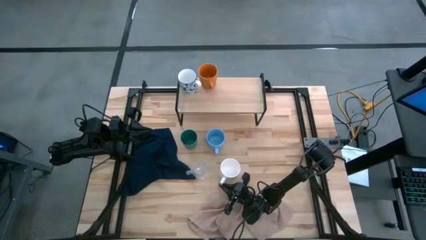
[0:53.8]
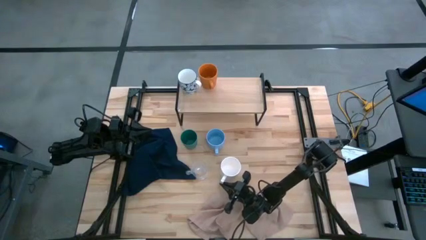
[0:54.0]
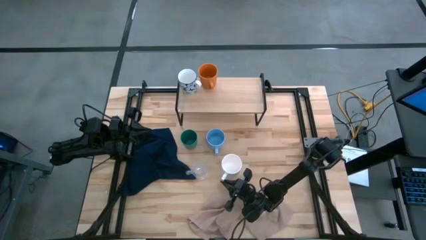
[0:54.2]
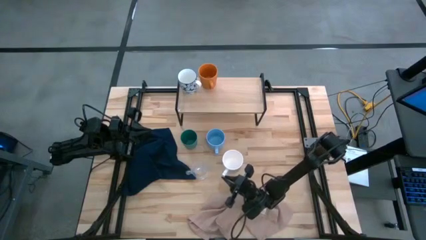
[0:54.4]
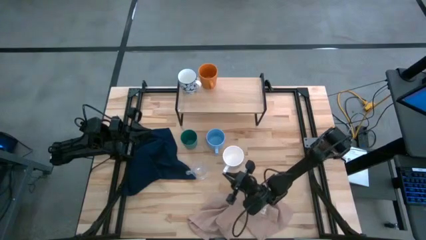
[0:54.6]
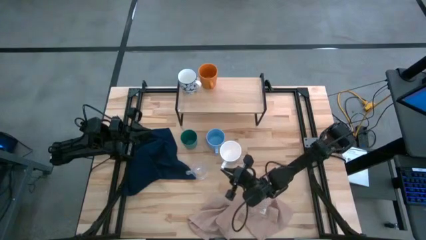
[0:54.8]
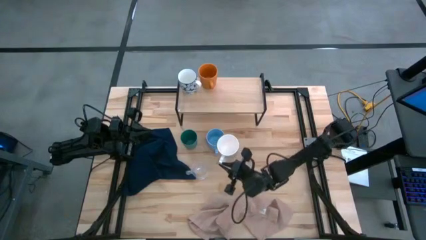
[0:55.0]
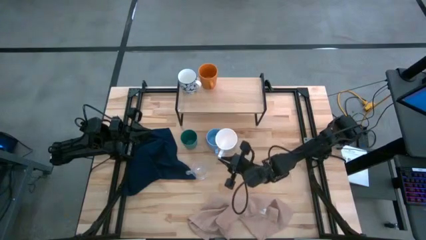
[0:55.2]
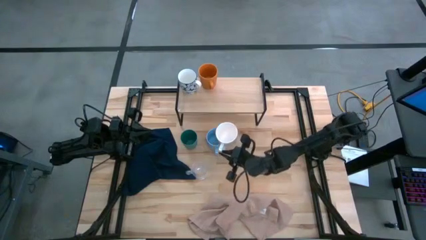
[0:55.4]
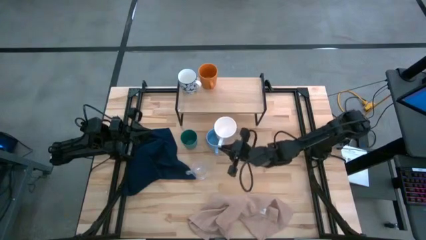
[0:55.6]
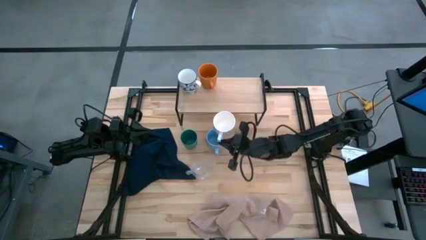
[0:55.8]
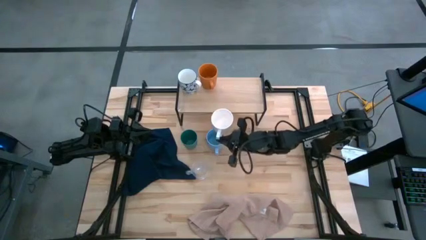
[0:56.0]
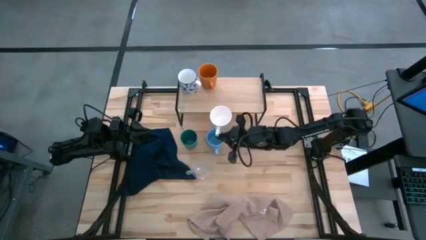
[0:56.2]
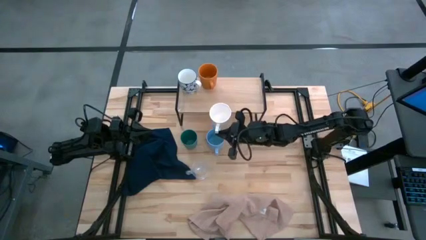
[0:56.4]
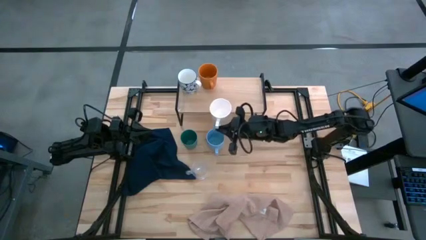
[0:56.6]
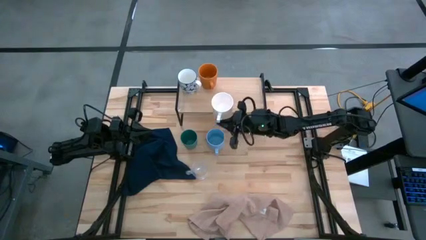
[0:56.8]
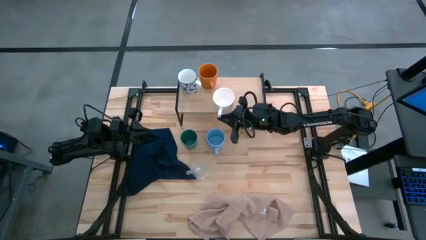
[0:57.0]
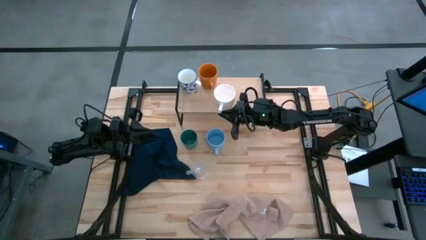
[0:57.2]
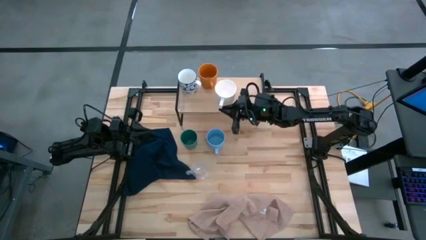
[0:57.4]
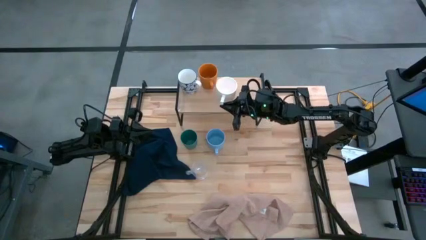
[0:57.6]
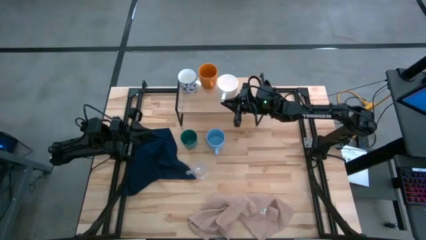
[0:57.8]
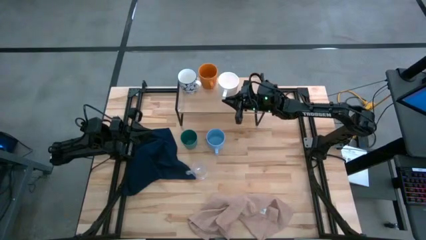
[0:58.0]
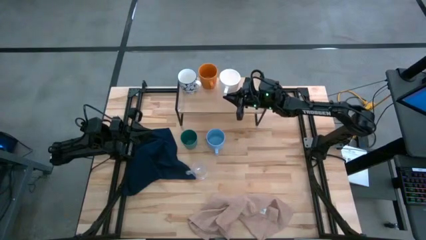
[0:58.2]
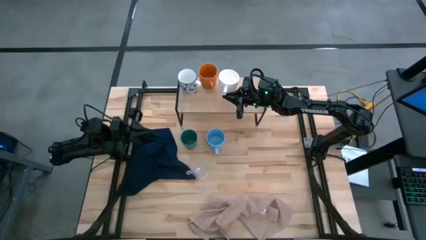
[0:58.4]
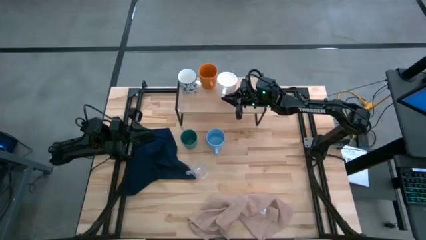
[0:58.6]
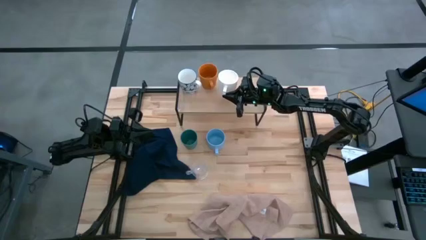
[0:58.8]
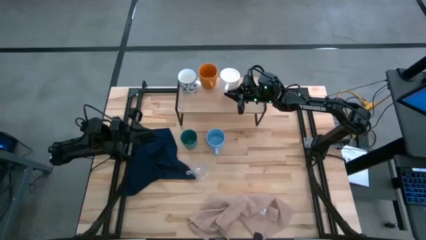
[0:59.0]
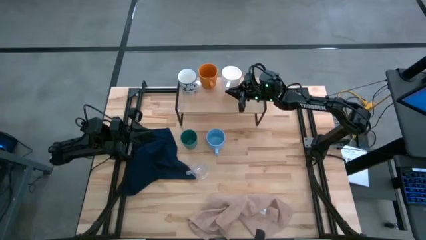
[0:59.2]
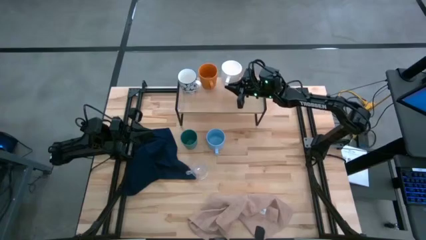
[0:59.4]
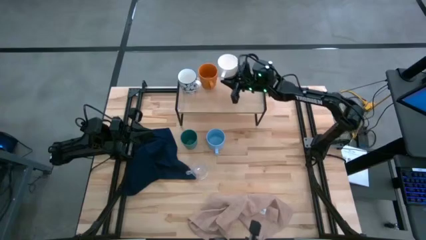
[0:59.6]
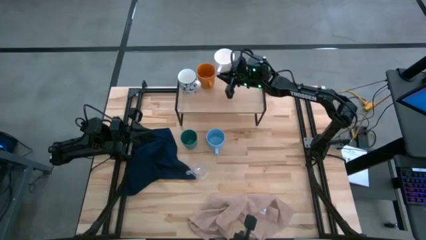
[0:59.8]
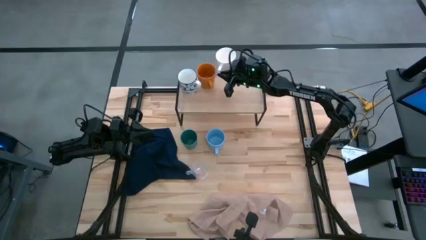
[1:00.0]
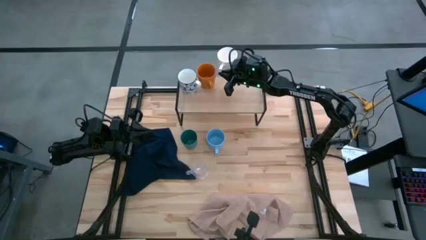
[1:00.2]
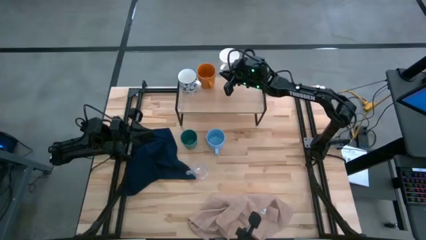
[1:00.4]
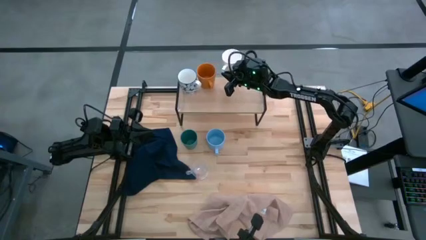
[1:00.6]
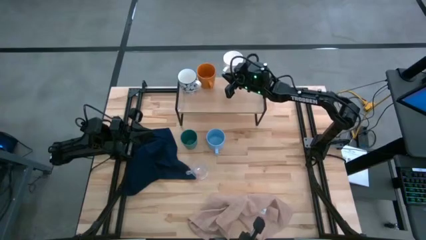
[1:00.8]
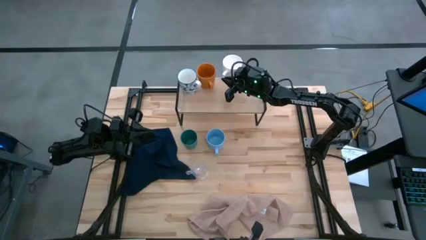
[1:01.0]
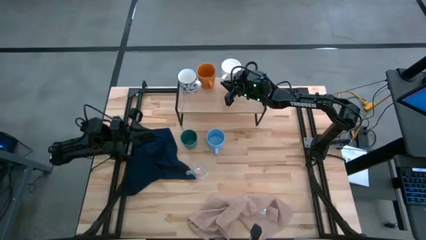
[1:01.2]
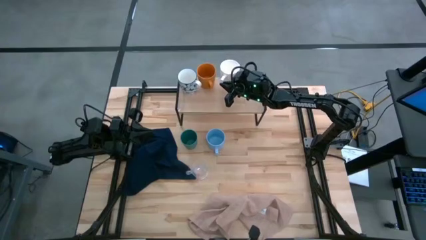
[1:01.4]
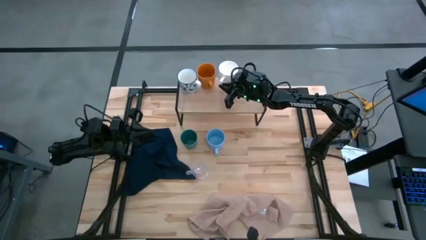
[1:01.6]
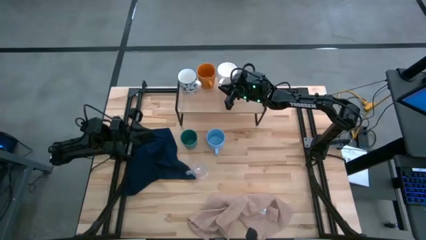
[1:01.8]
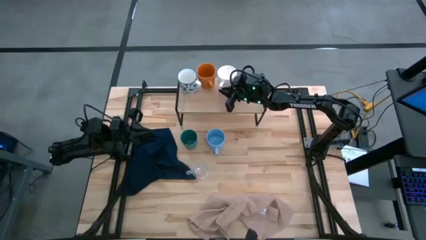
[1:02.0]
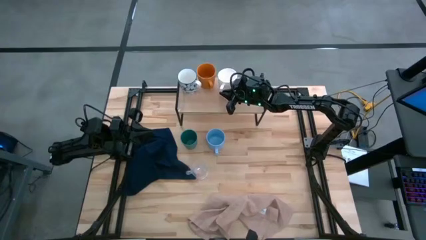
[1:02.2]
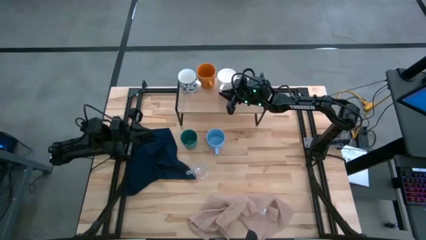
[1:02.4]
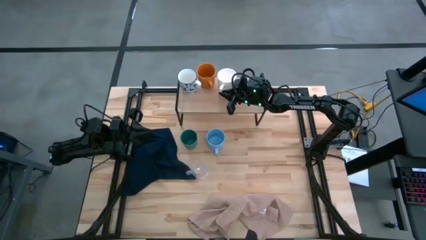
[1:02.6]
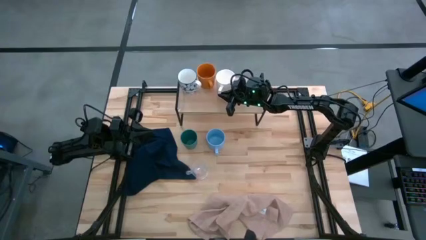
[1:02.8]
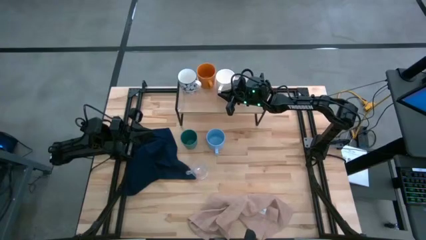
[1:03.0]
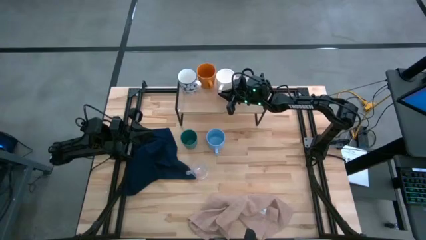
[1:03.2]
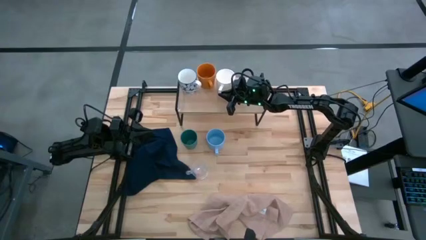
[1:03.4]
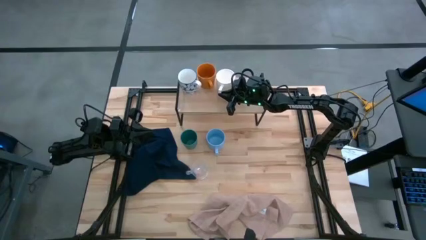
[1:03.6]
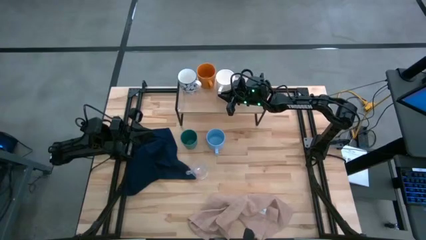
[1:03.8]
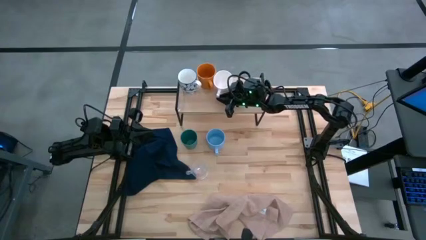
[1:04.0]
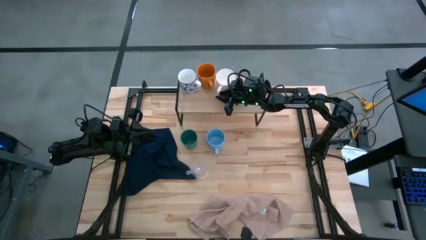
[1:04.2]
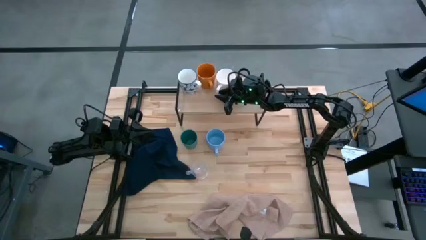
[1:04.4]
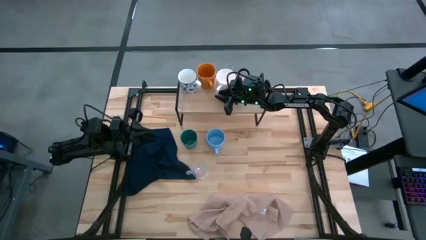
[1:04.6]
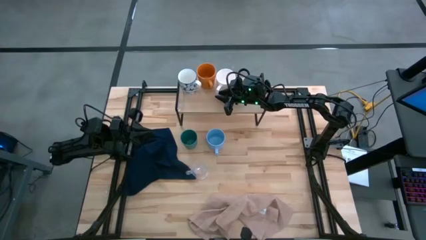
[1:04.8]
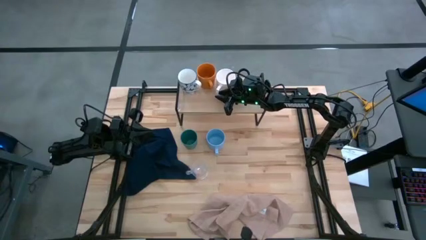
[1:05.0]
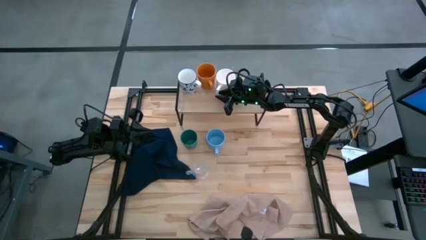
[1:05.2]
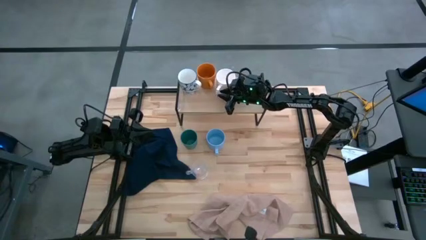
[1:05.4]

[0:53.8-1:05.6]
Task: Stack small to large cups/mugs on shelf
Put the white mug on the shelf
